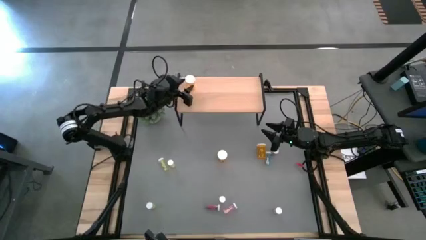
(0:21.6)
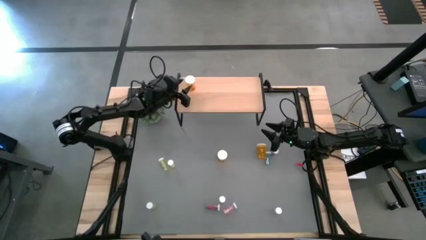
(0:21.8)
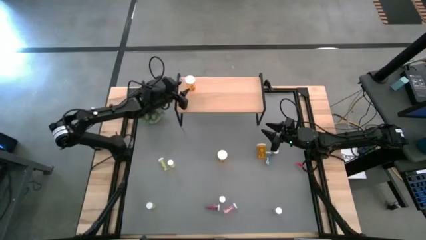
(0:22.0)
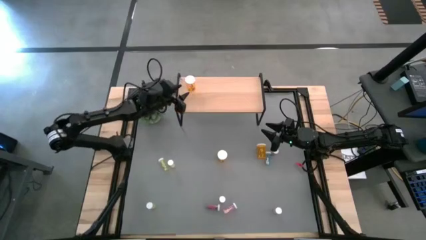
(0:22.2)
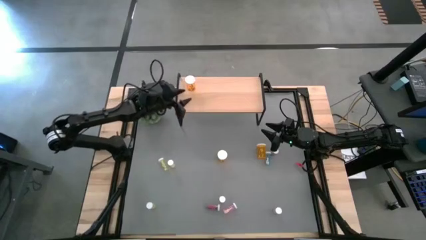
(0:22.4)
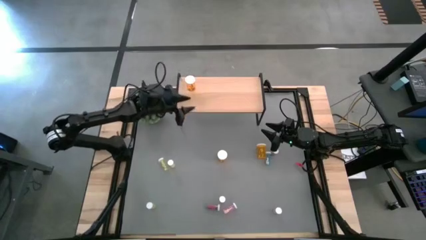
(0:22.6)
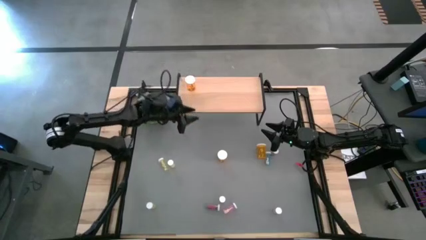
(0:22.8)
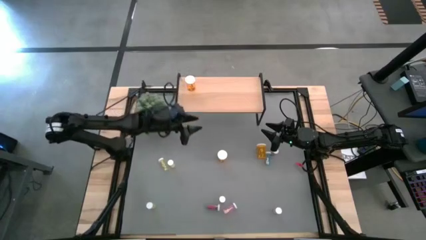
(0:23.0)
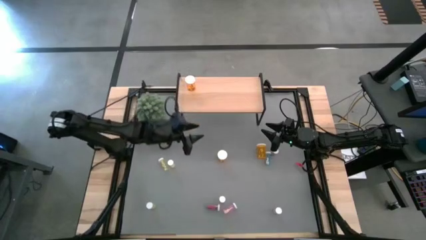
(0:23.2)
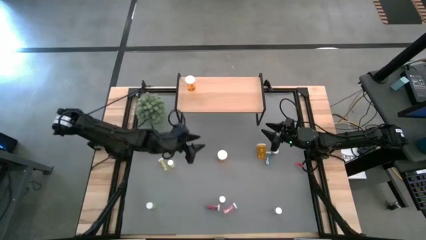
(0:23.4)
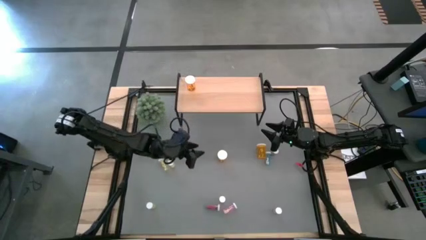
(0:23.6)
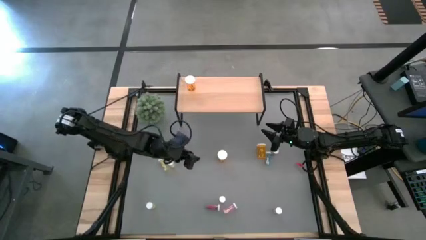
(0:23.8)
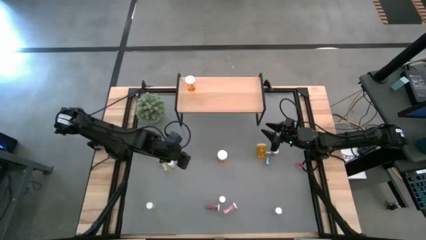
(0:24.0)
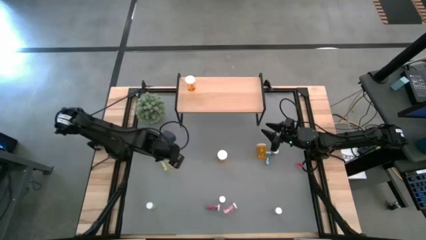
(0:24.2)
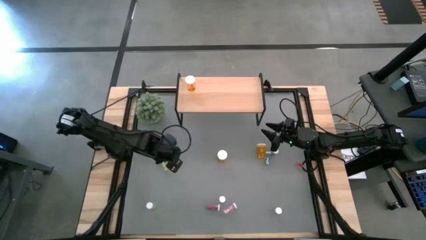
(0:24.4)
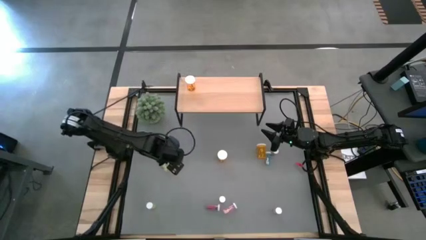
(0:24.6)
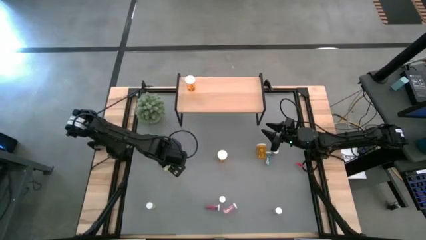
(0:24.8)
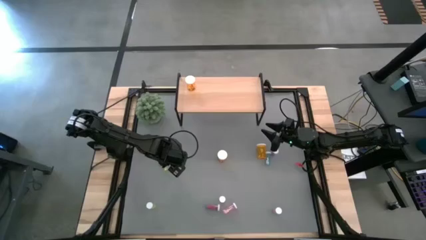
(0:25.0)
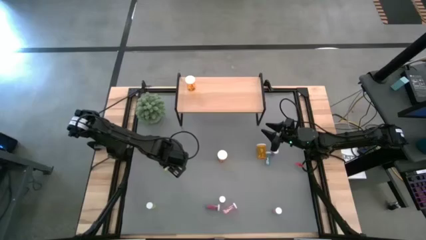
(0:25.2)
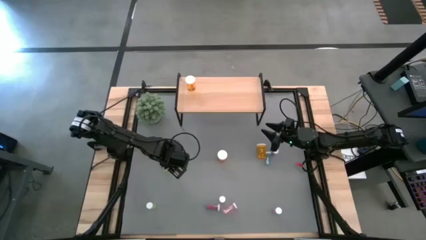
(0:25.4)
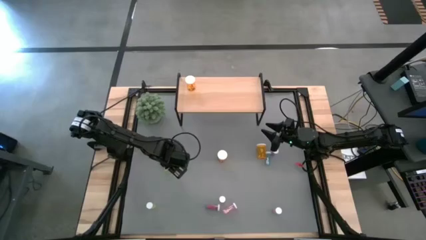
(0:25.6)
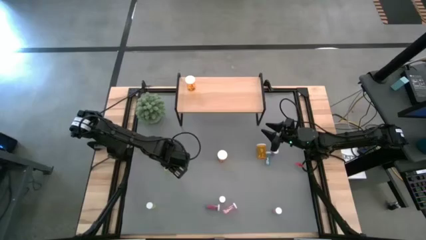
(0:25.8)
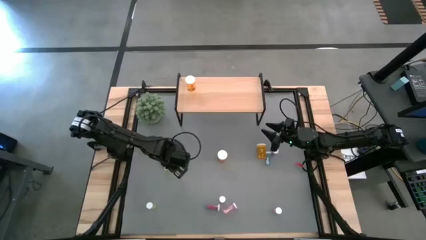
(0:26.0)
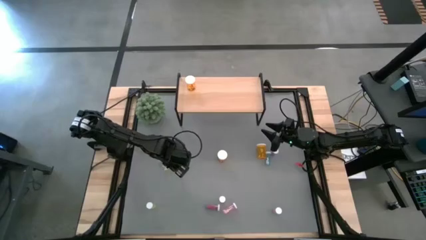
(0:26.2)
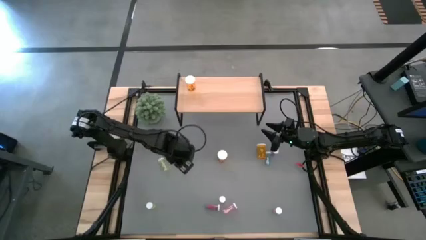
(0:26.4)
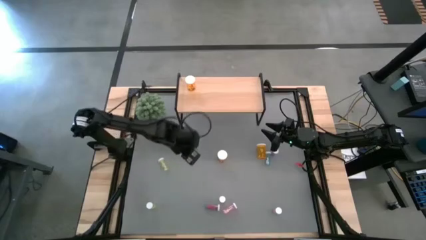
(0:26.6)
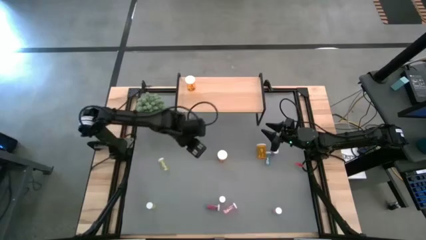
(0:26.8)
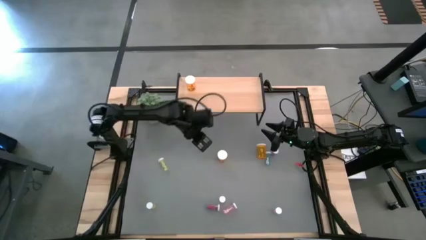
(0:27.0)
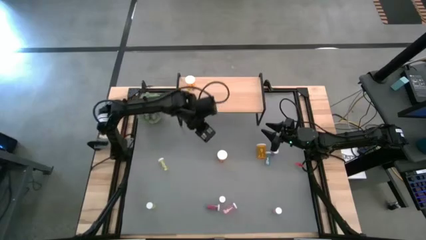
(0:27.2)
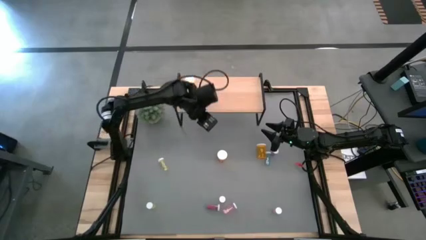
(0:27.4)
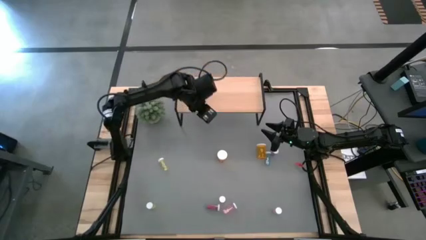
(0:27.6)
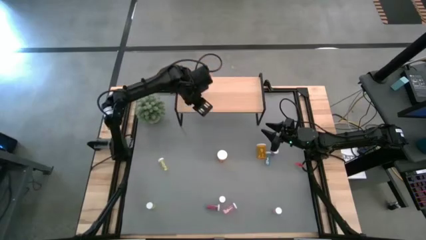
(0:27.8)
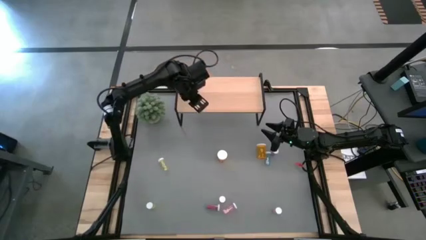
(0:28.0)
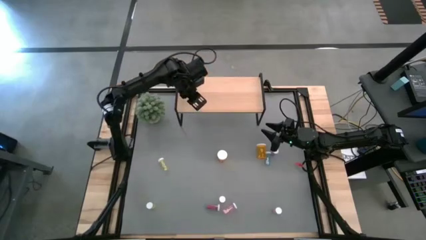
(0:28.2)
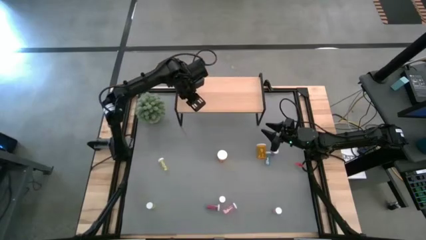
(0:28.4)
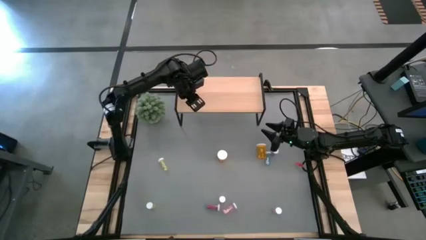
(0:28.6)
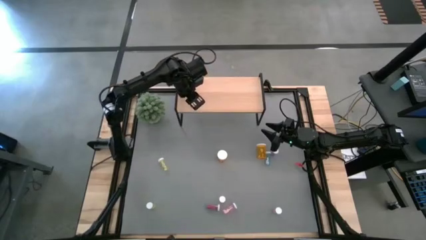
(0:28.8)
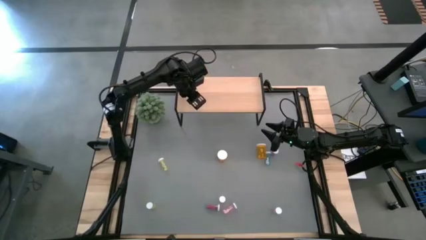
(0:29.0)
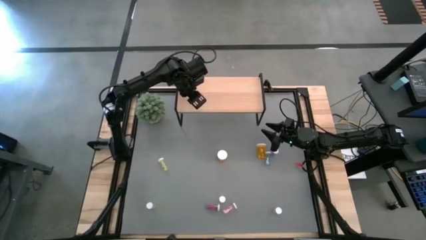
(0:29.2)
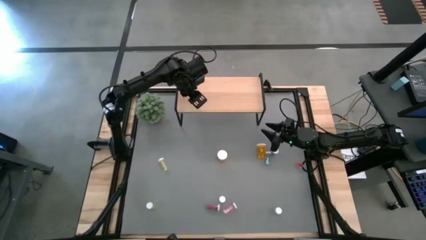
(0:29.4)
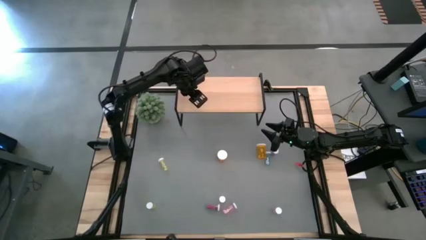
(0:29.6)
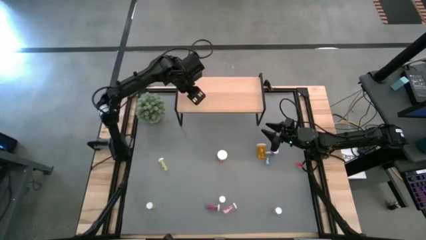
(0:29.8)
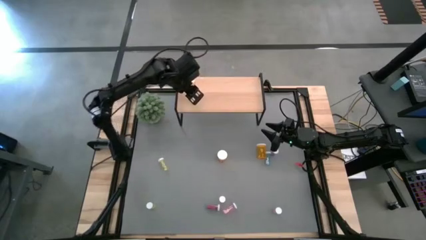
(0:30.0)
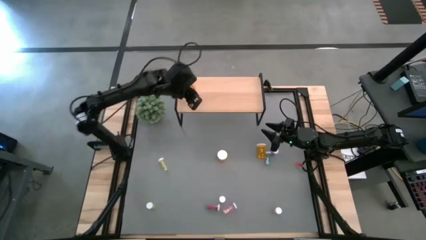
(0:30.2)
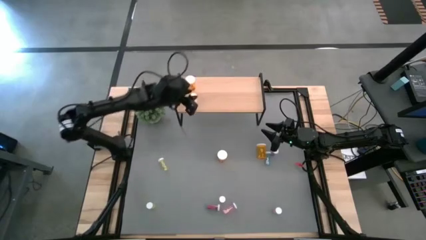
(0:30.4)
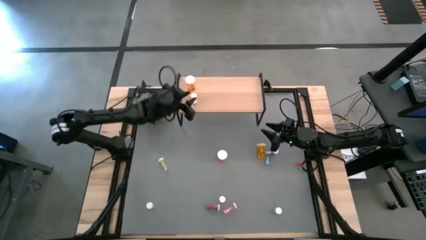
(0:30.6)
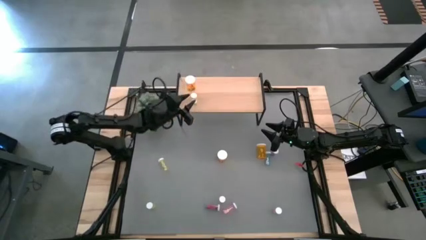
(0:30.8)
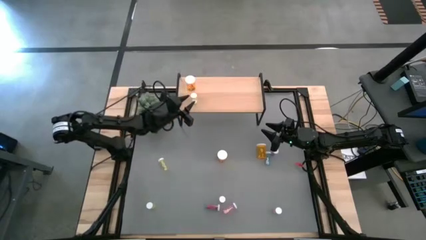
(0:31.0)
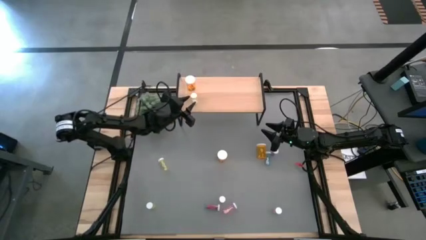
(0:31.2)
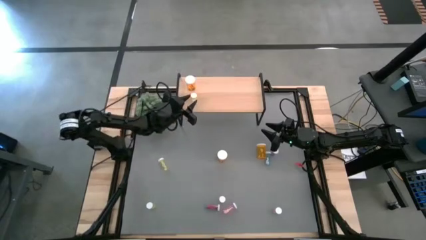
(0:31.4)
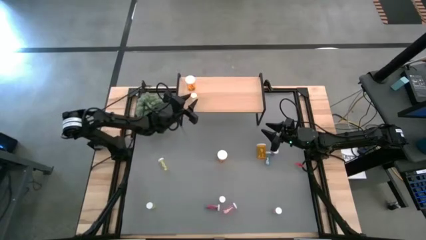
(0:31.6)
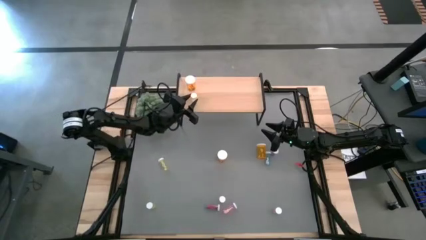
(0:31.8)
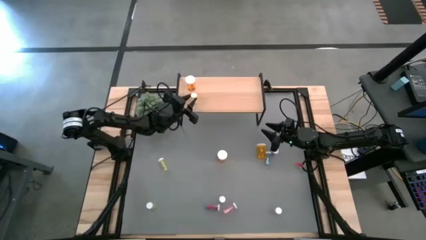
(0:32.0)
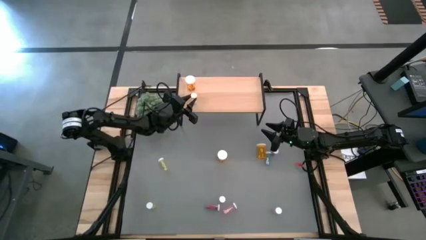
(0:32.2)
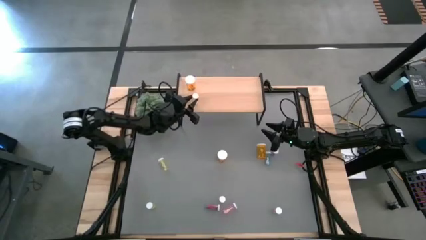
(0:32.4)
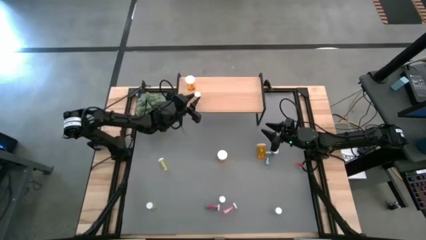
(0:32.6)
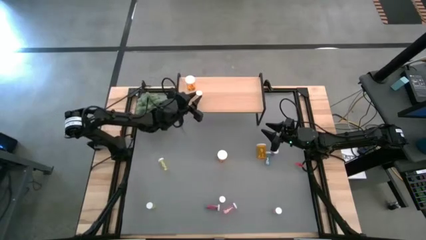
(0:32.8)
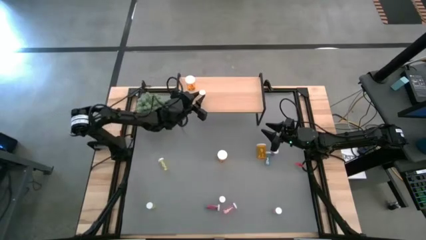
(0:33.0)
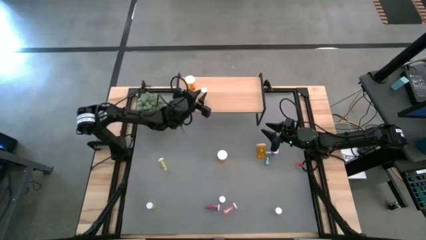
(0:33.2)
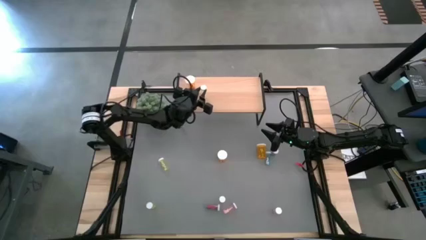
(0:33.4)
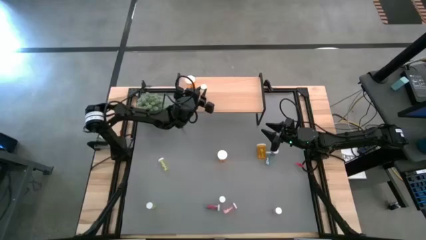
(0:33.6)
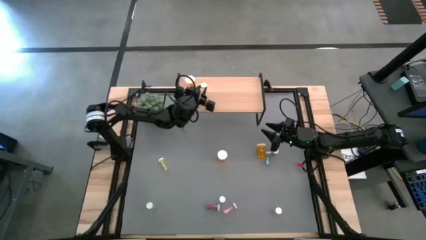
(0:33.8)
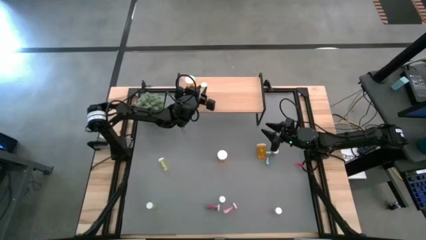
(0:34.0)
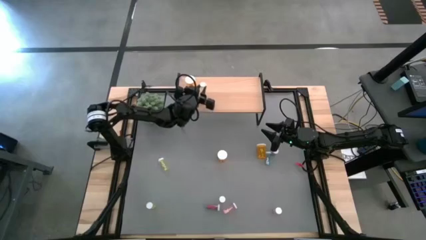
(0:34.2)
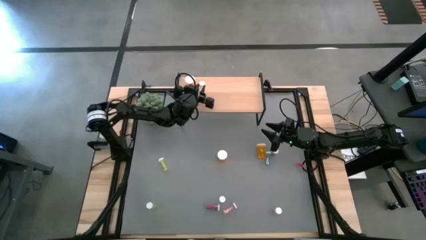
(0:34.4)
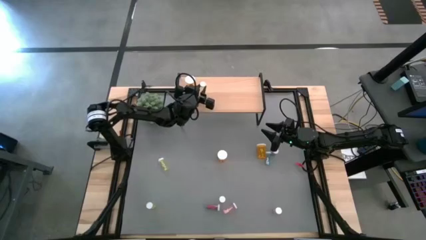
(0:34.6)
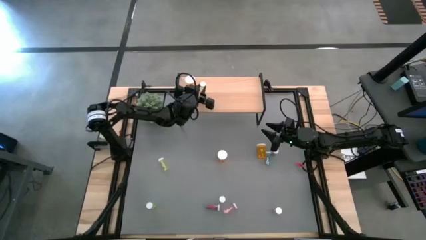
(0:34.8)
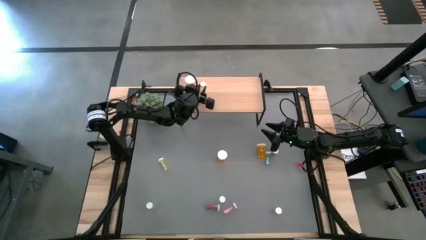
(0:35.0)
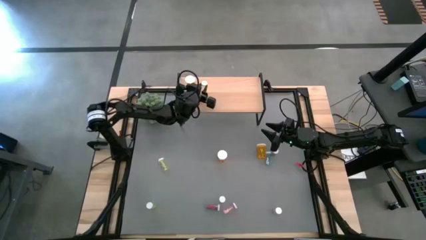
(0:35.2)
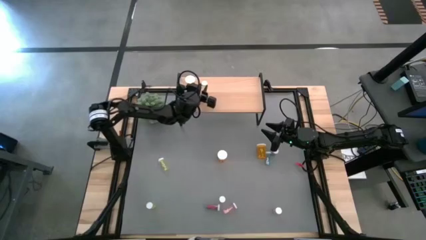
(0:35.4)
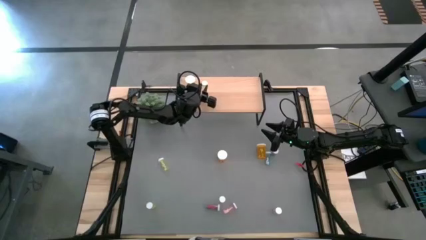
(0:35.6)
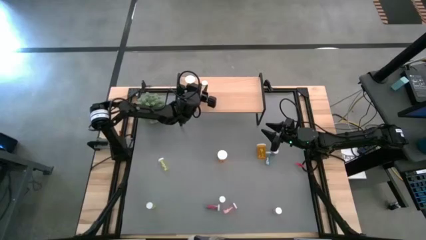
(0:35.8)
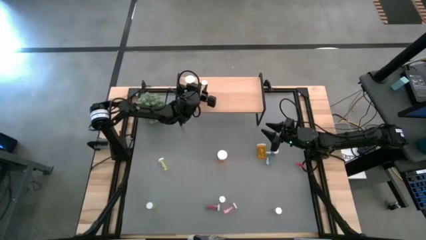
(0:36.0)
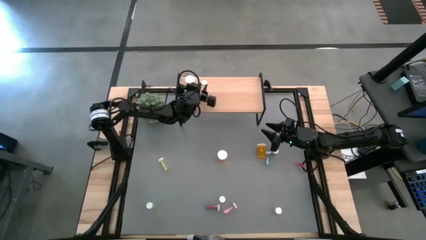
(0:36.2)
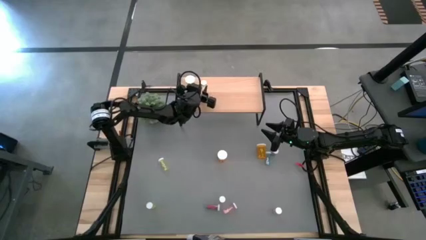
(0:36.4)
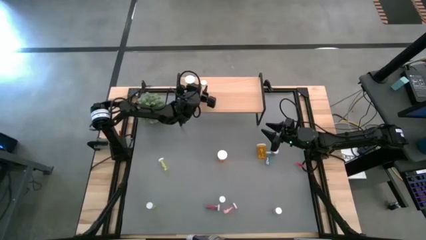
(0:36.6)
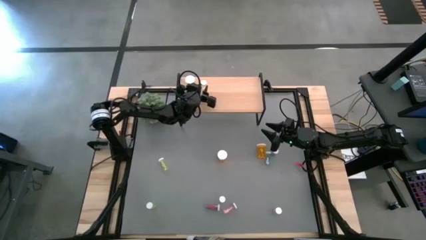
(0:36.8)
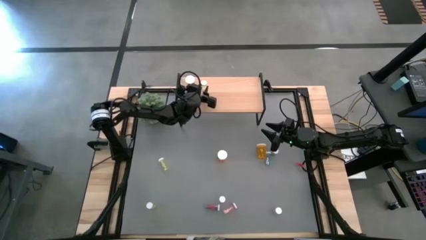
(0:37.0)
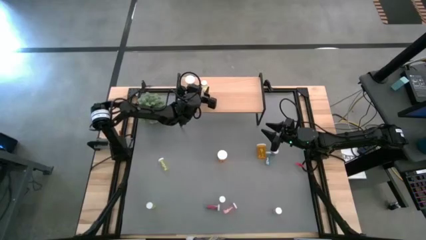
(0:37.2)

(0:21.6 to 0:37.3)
Task: Pick and place medicine bottles onto shelf by color
Put the top yellow pill bottle to the right of the orange pill bottle on the shelf
